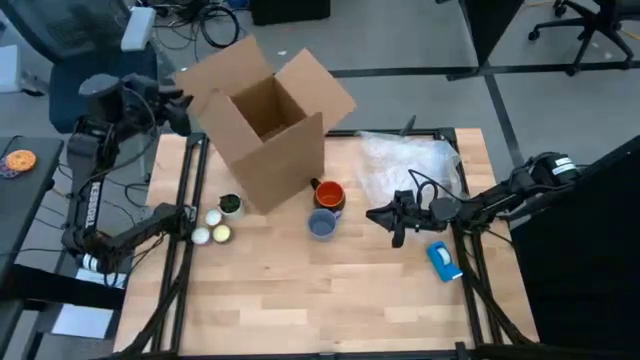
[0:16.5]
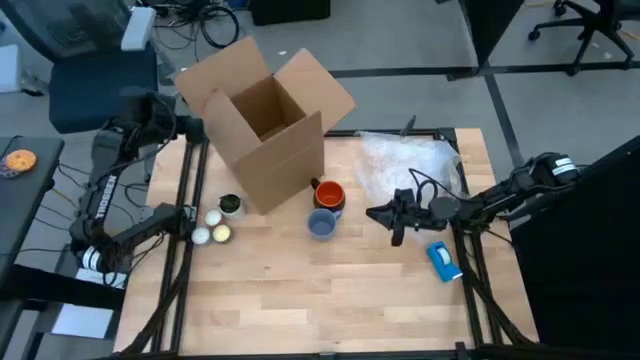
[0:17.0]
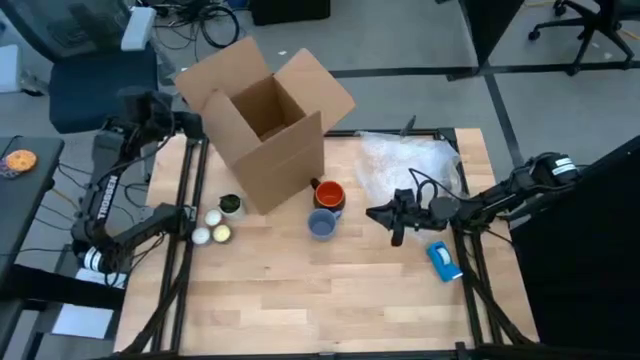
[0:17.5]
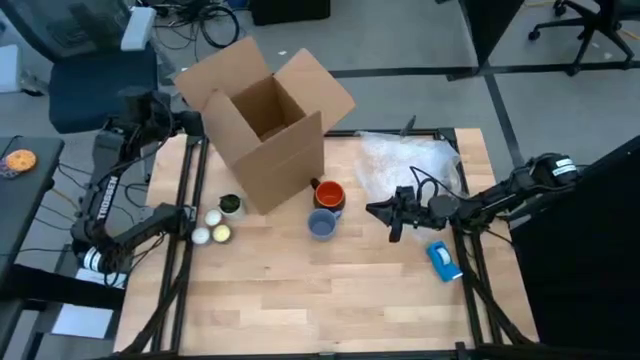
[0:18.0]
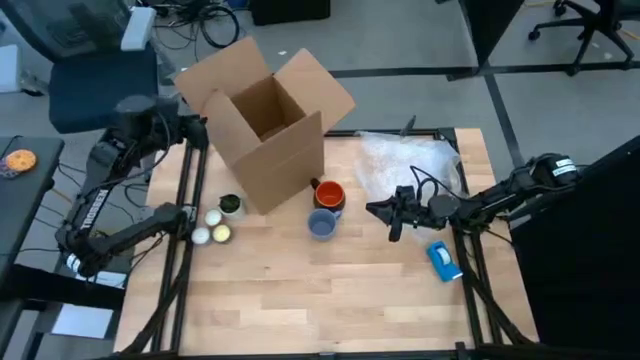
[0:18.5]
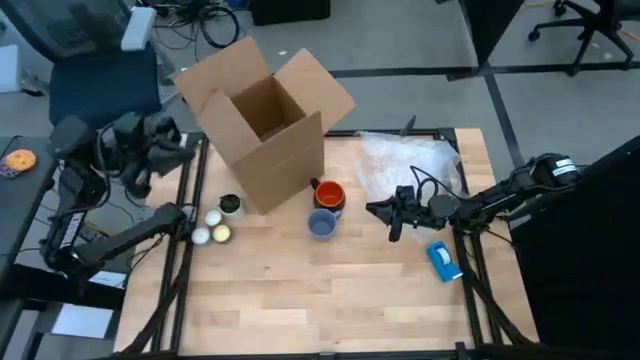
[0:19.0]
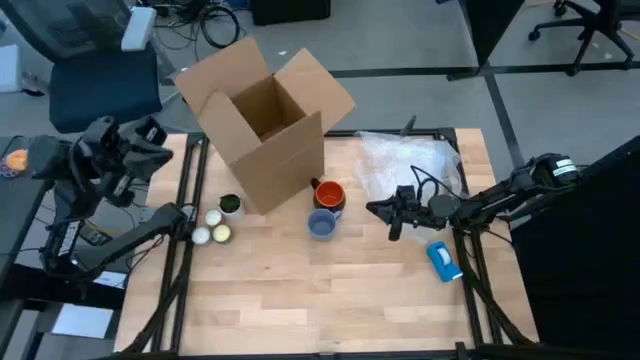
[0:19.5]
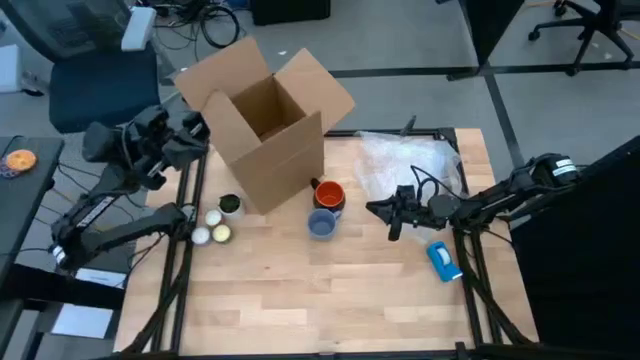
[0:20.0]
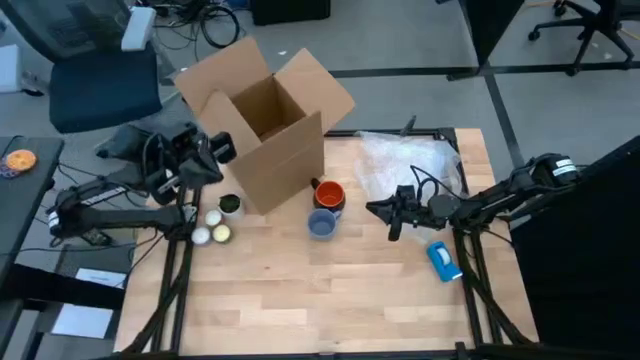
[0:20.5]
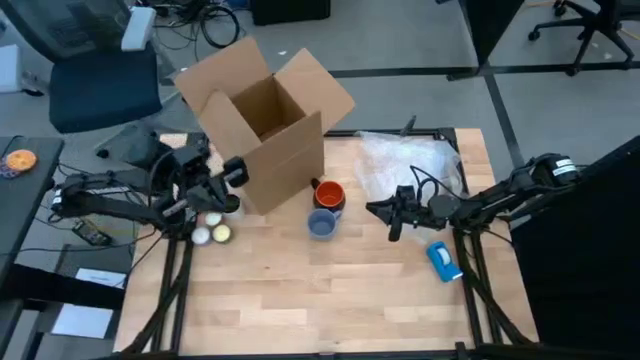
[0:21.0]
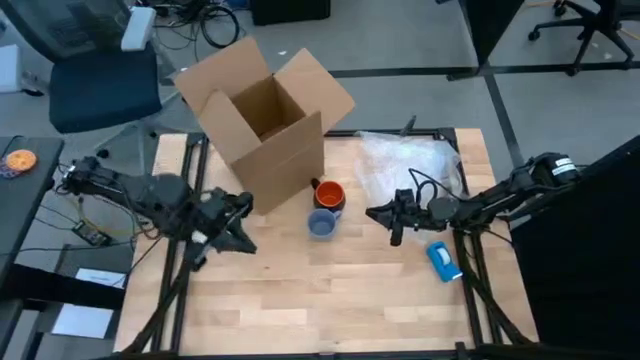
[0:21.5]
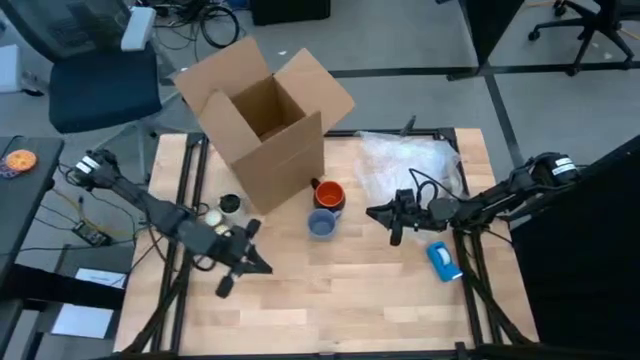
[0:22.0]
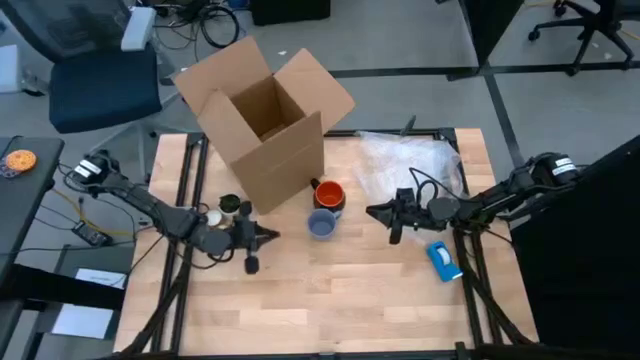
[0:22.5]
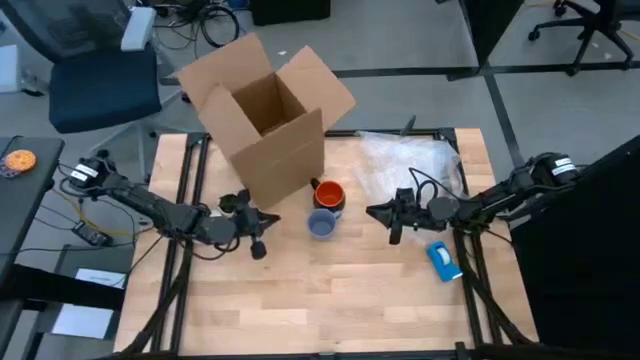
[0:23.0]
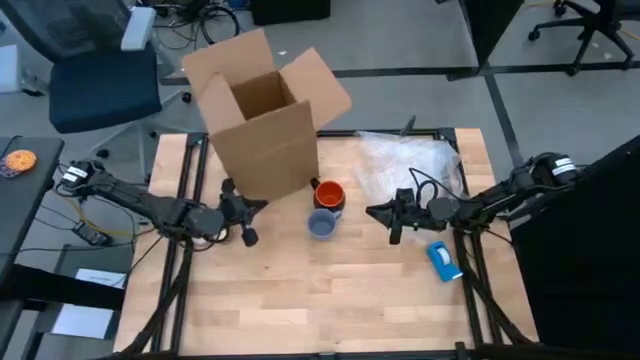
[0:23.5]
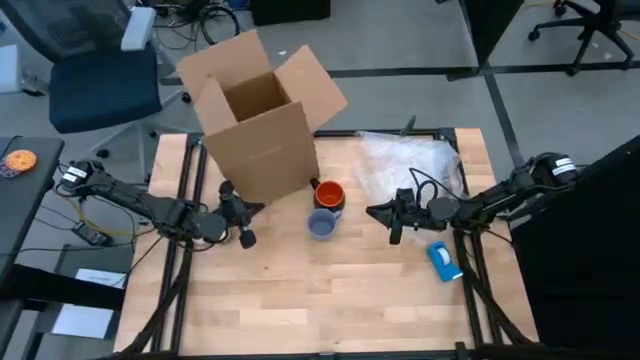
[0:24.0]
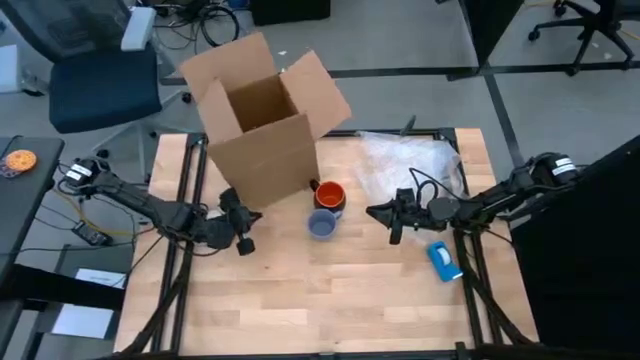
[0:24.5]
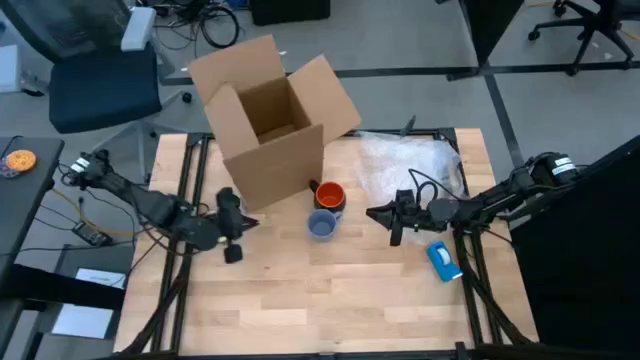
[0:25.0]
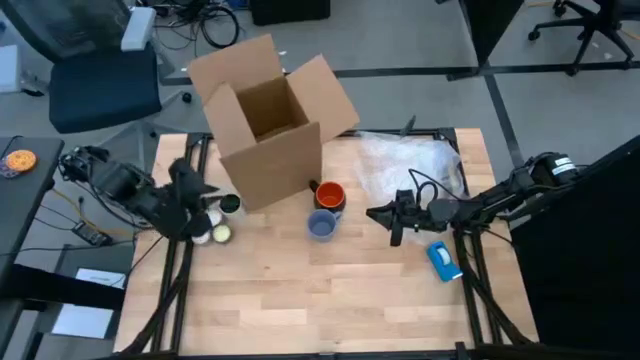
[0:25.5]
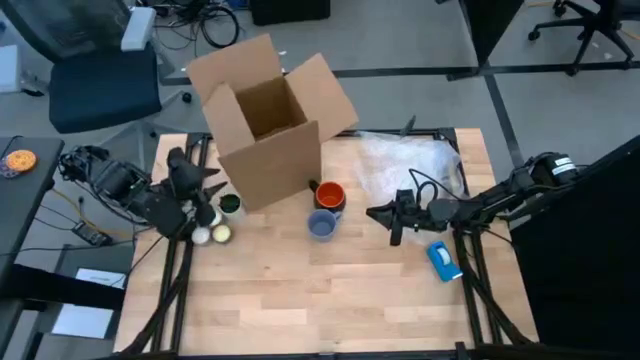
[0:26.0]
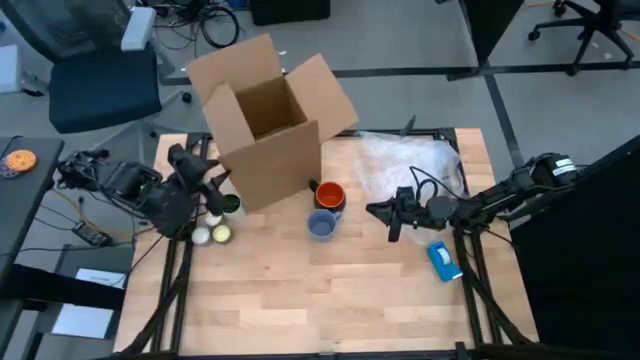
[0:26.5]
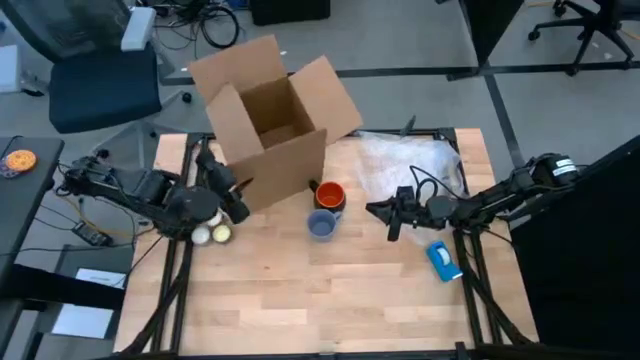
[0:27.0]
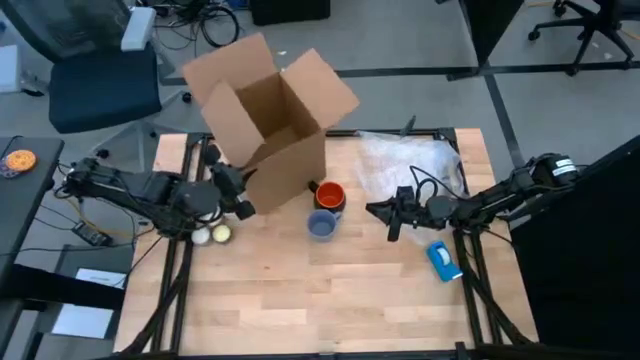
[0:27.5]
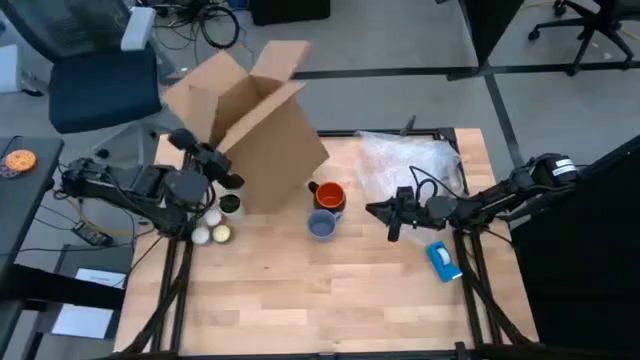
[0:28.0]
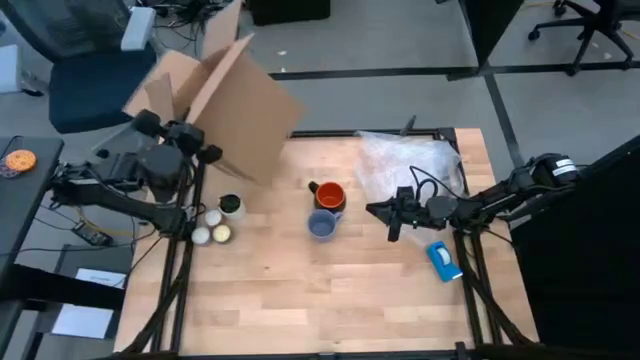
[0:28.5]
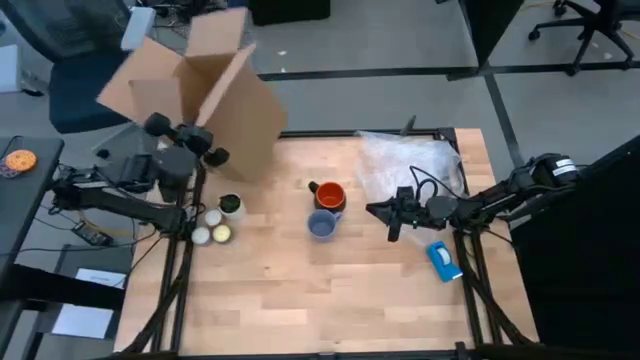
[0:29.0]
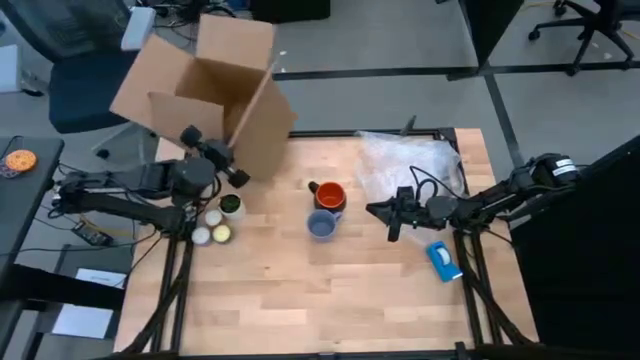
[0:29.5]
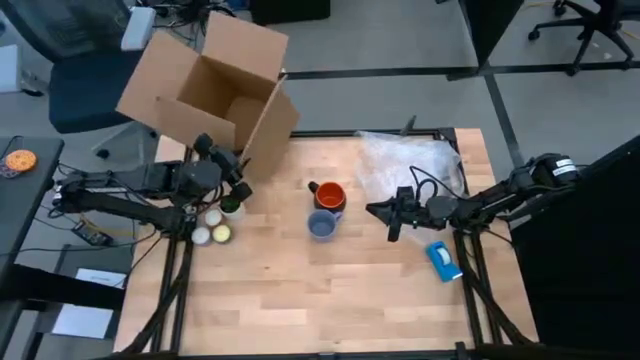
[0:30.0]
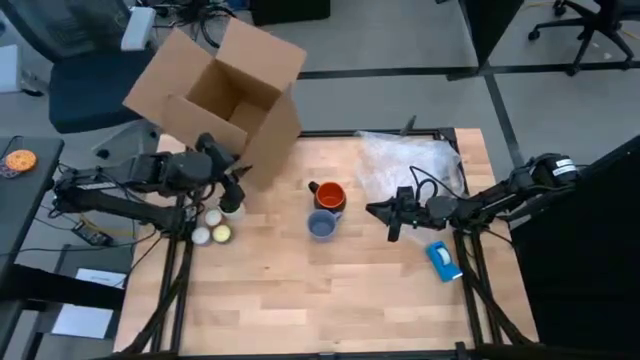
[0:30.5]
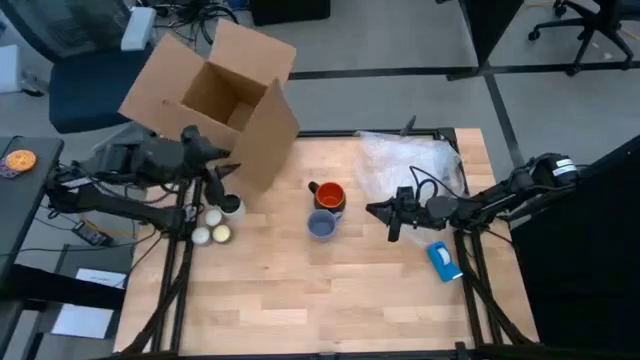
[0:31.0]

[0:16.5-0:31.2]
Task: wrap mug
Prepare the box

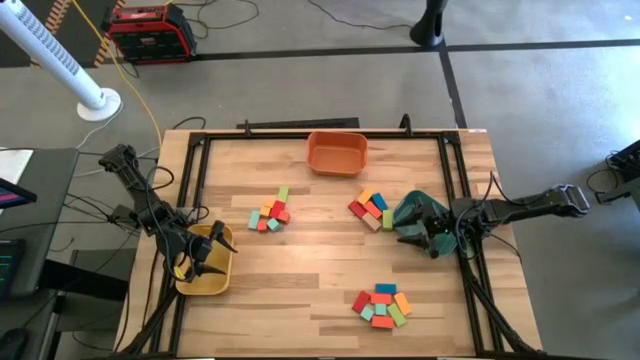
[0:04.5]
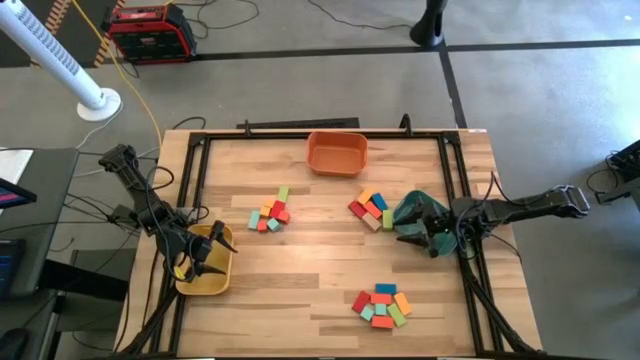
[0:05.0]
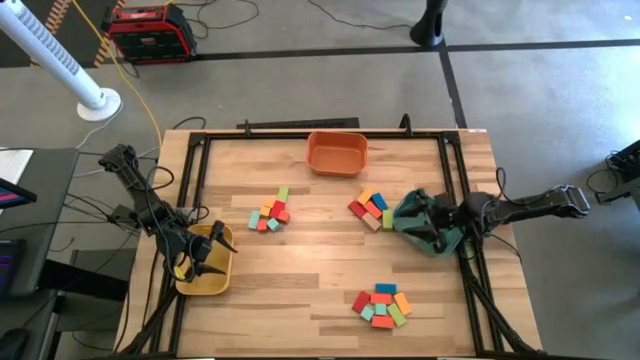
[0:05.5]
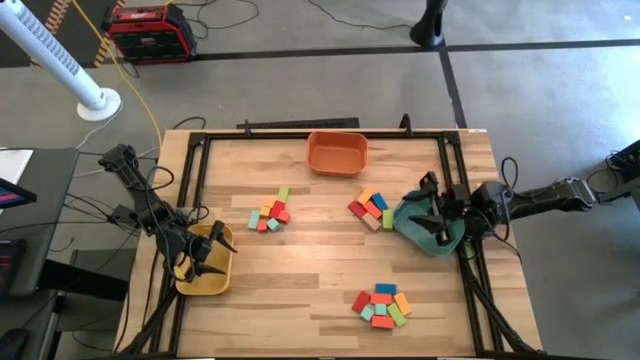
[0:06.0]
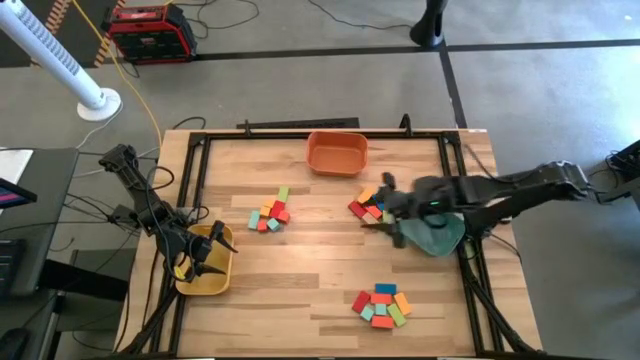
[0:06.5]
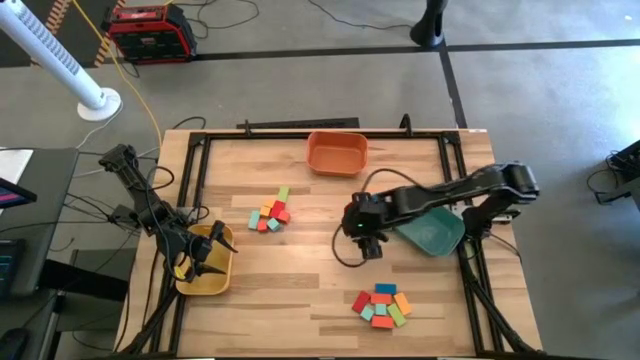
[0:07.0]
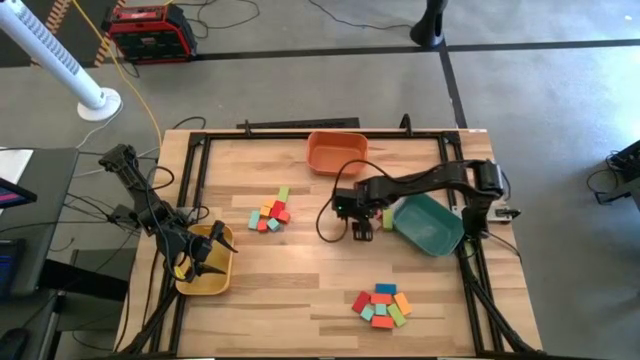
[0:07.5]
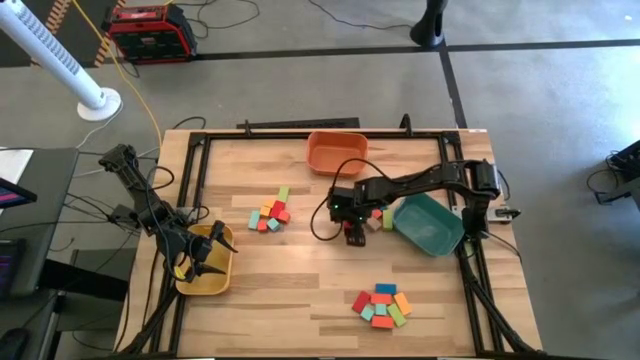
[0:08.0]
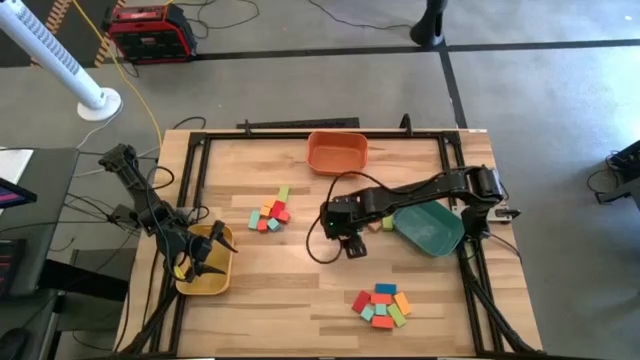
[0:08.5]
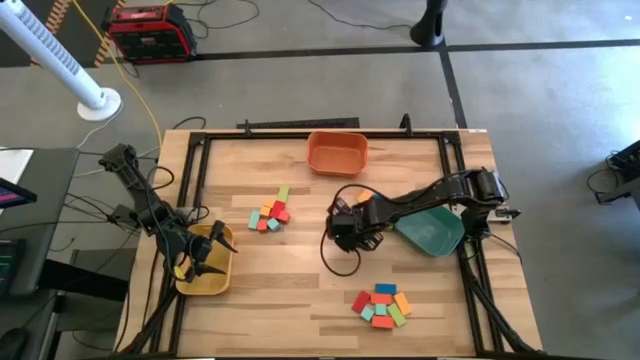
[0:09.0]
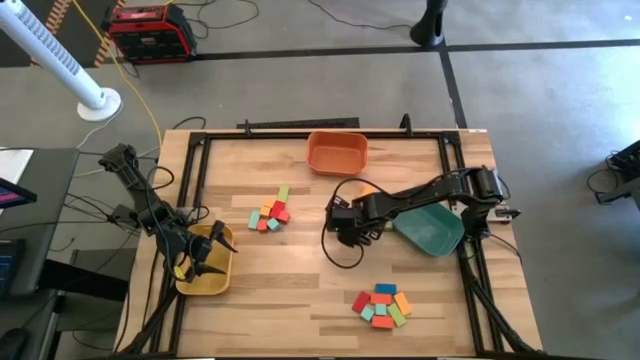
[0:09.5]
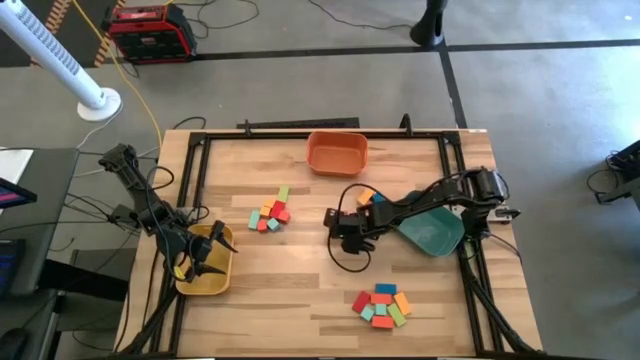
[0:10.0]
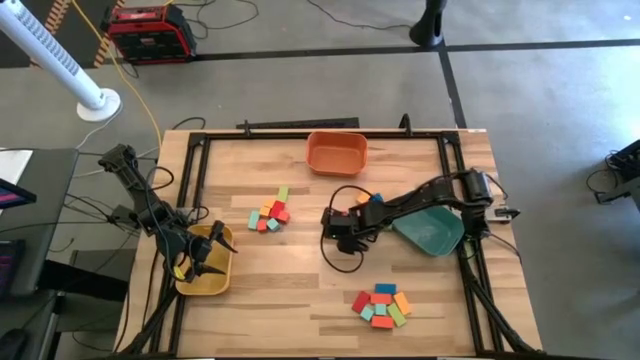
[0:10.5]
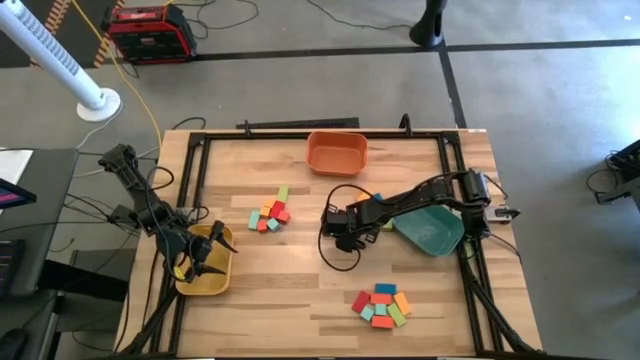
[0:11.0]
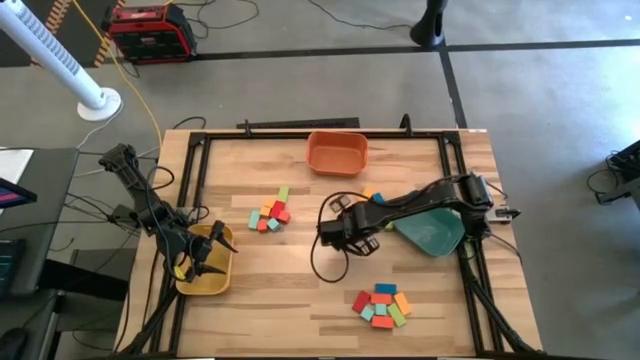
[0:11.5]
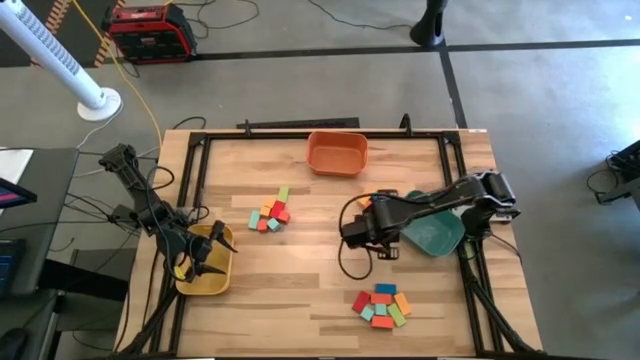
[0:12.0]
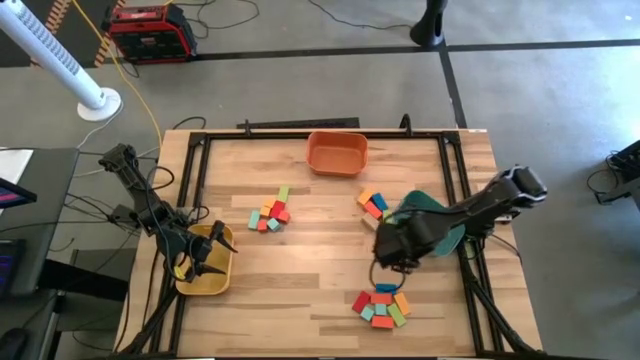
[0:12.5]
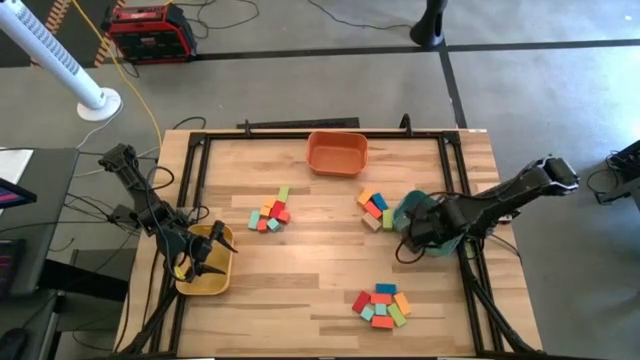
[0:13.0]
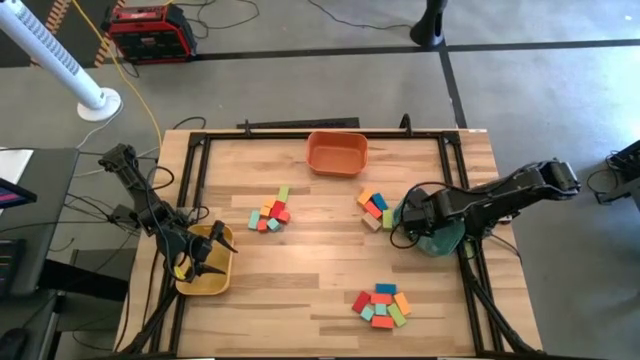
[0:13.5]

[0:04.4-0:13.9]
Task: Sort blocks by size
Put the medium red block into the green bin
